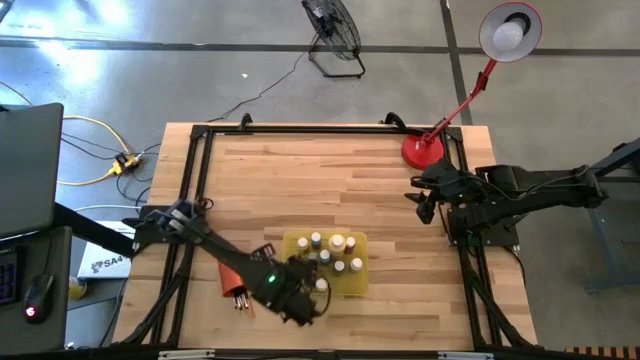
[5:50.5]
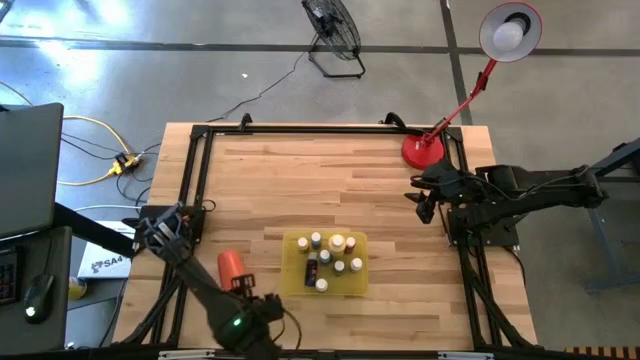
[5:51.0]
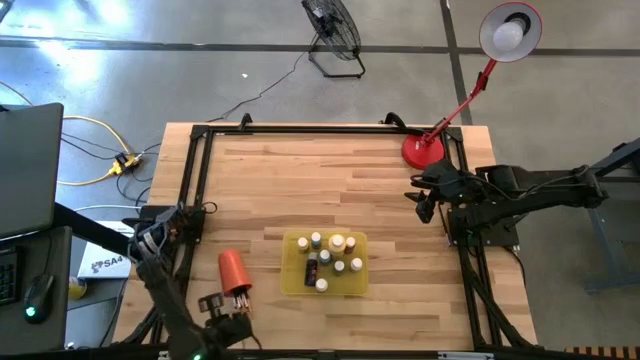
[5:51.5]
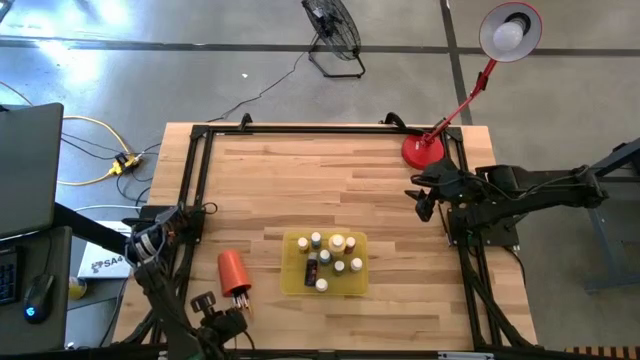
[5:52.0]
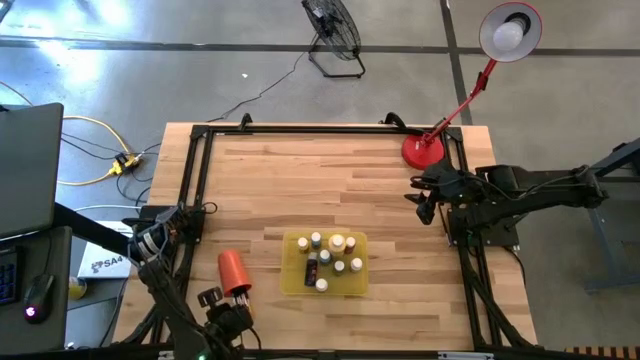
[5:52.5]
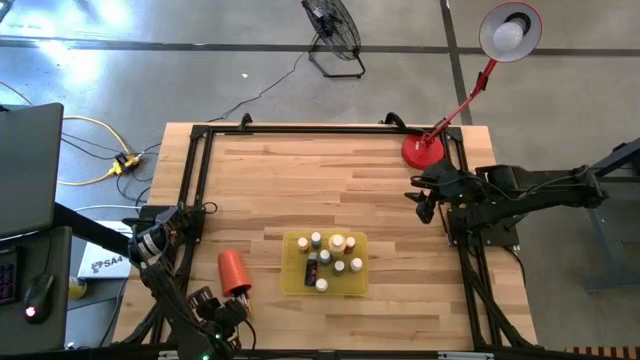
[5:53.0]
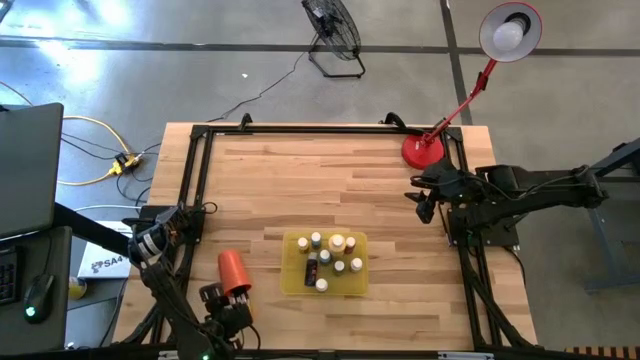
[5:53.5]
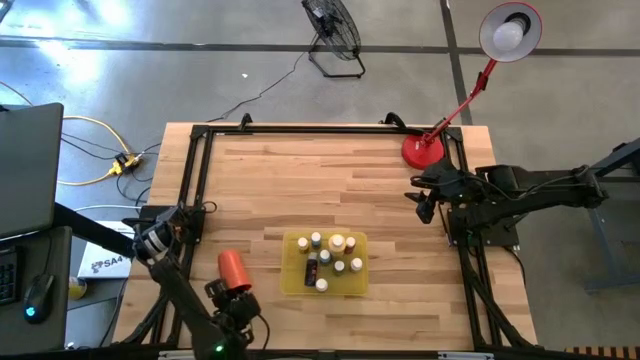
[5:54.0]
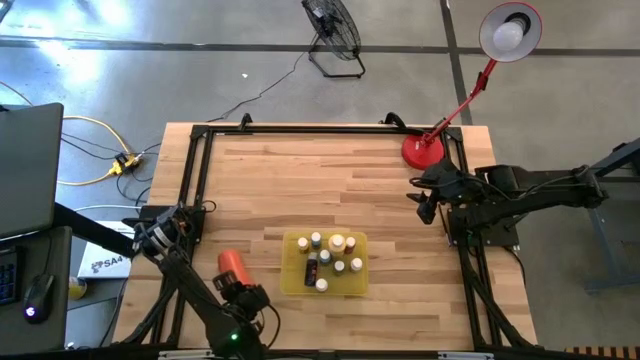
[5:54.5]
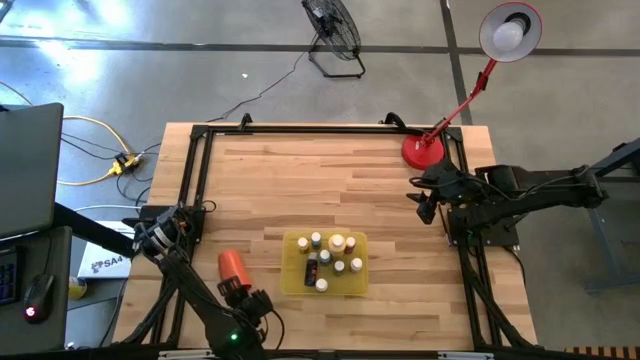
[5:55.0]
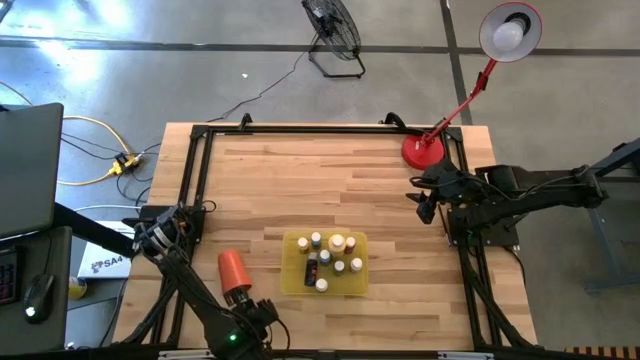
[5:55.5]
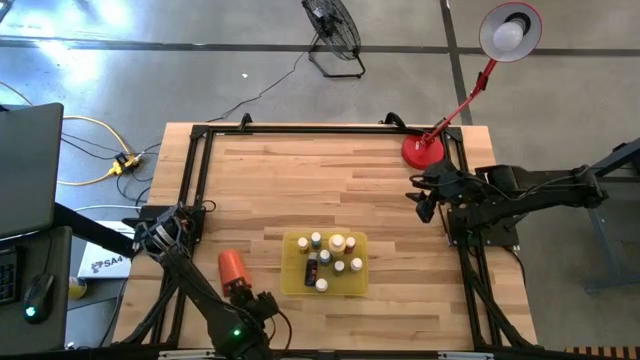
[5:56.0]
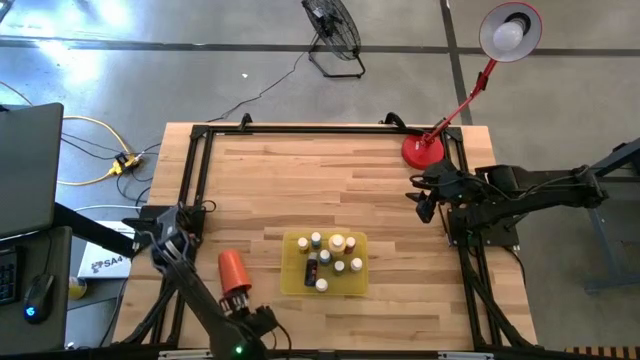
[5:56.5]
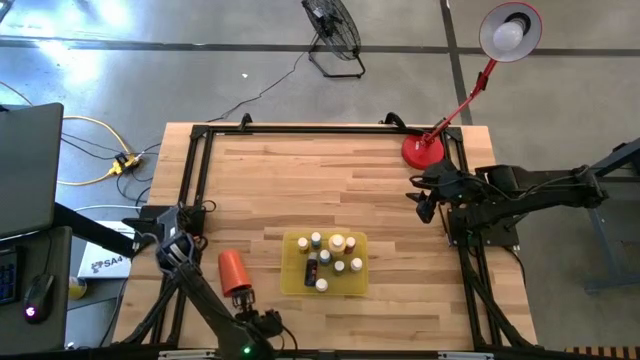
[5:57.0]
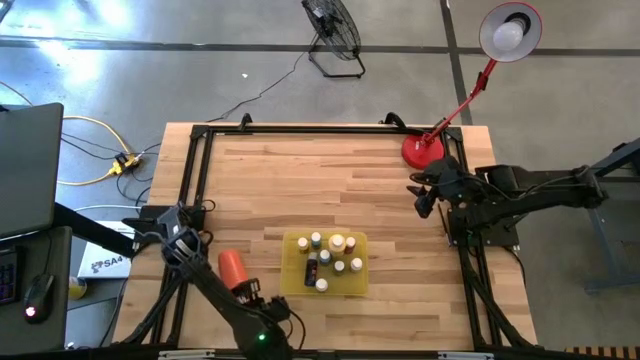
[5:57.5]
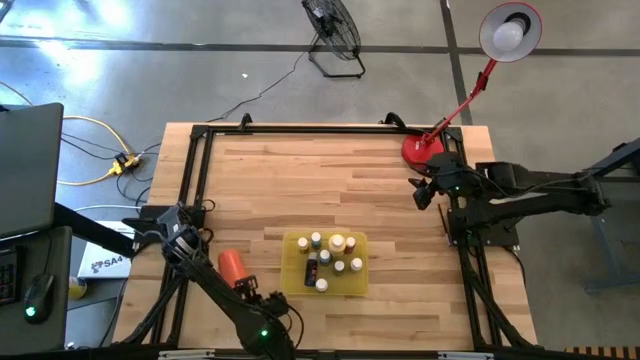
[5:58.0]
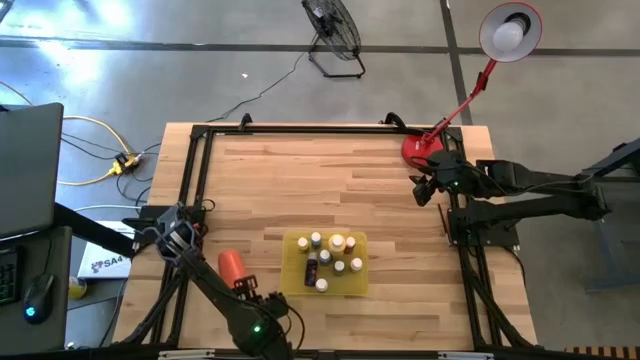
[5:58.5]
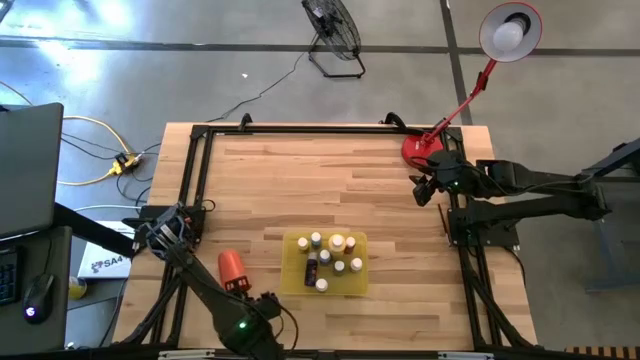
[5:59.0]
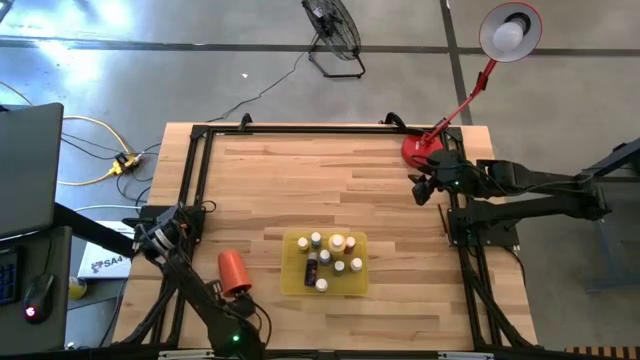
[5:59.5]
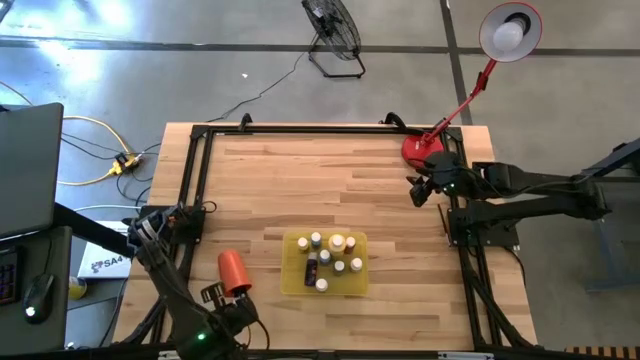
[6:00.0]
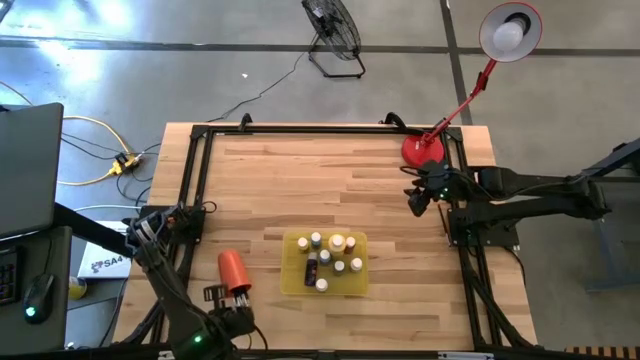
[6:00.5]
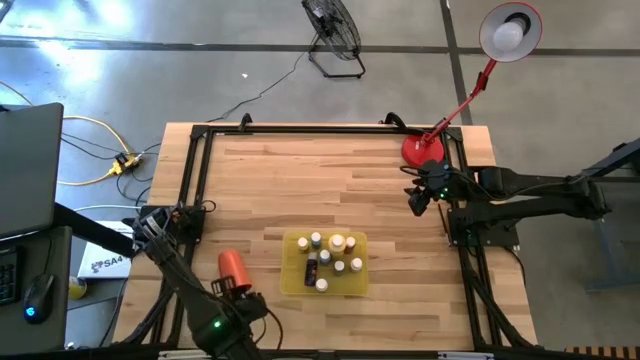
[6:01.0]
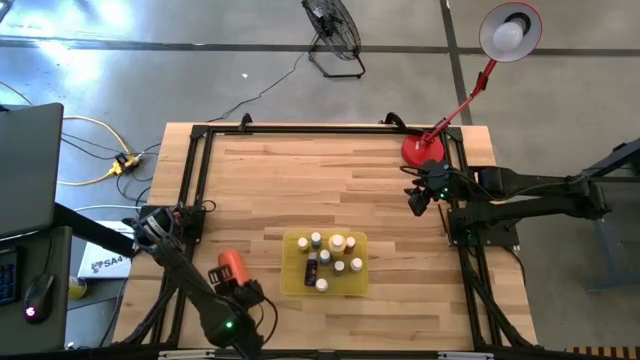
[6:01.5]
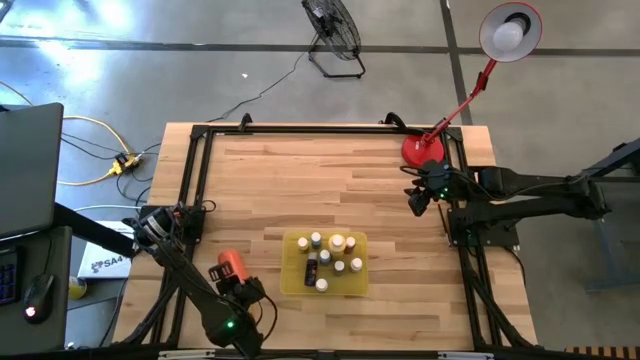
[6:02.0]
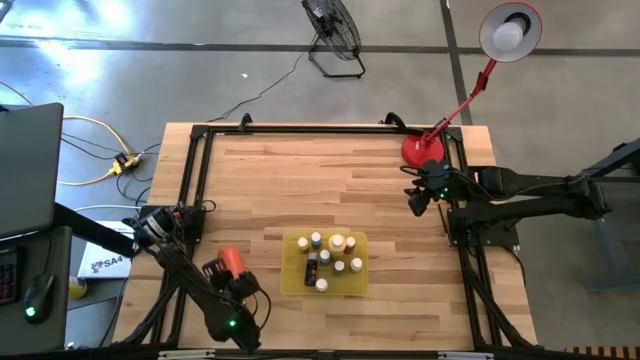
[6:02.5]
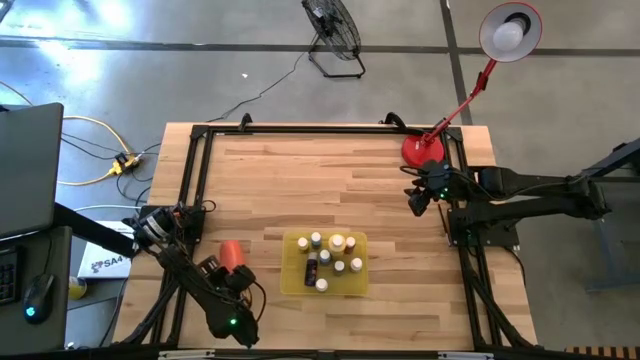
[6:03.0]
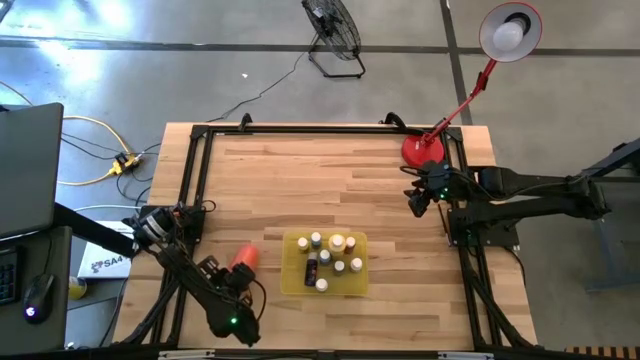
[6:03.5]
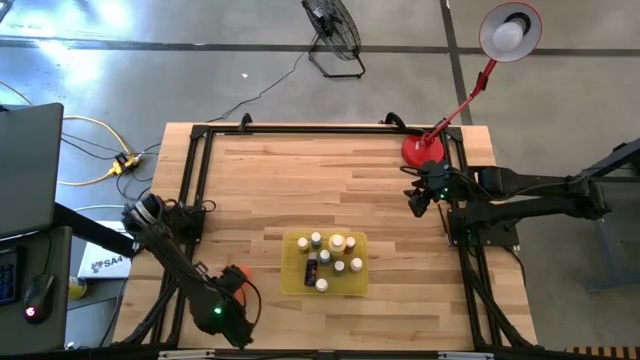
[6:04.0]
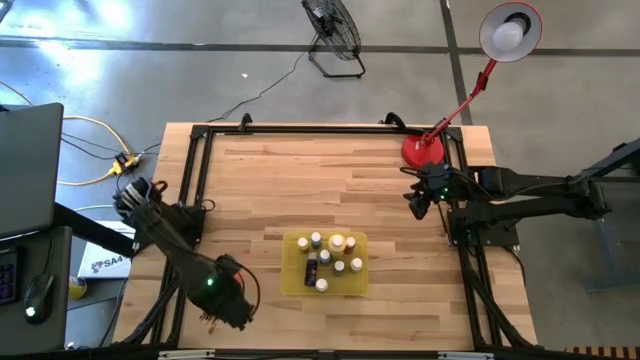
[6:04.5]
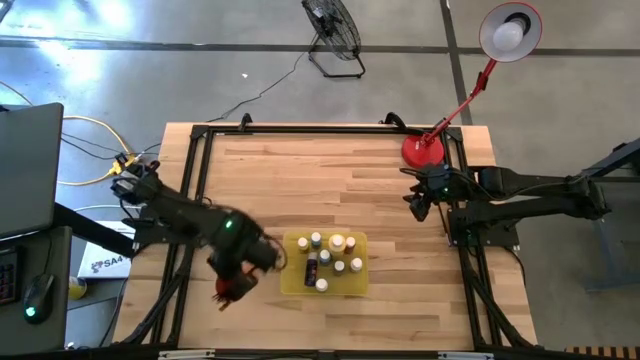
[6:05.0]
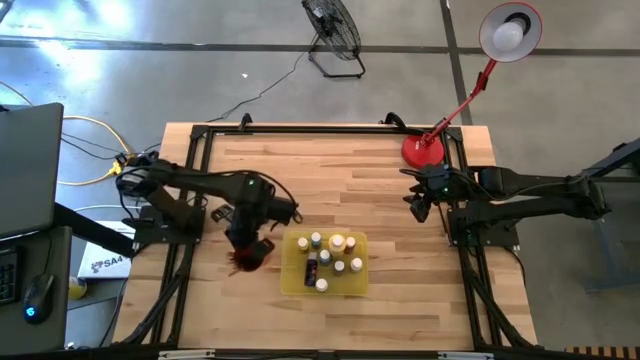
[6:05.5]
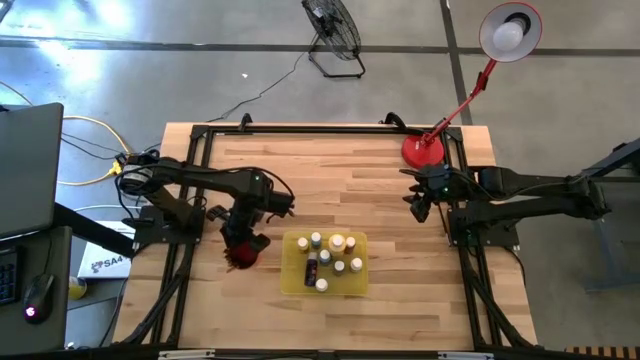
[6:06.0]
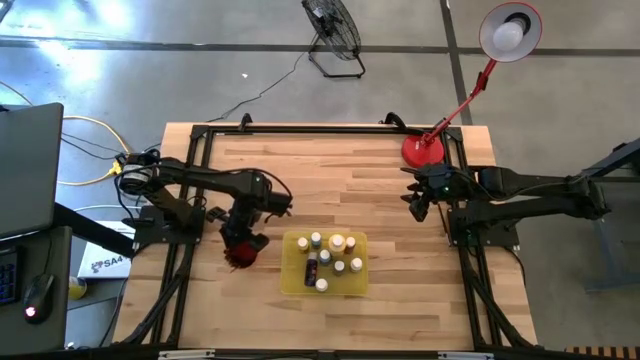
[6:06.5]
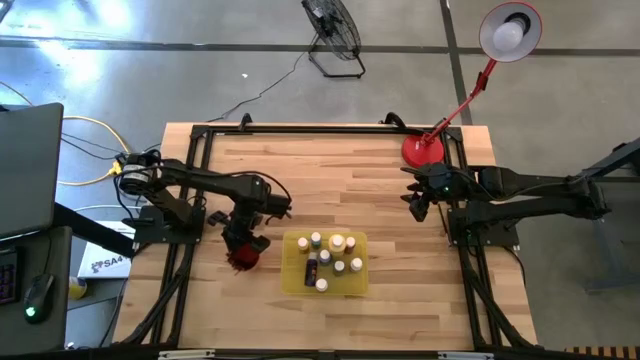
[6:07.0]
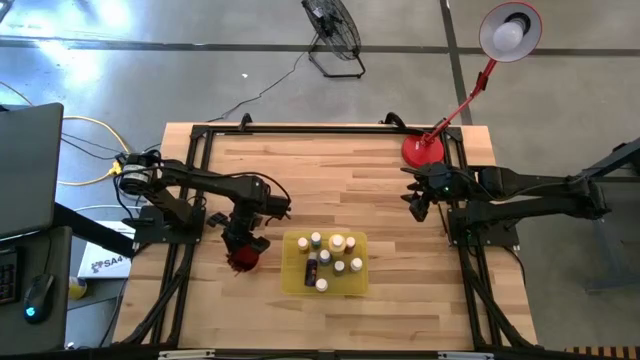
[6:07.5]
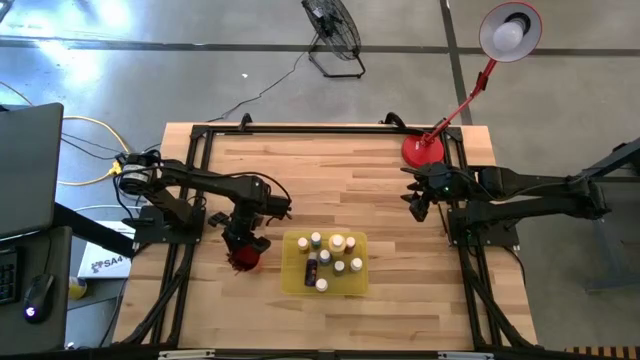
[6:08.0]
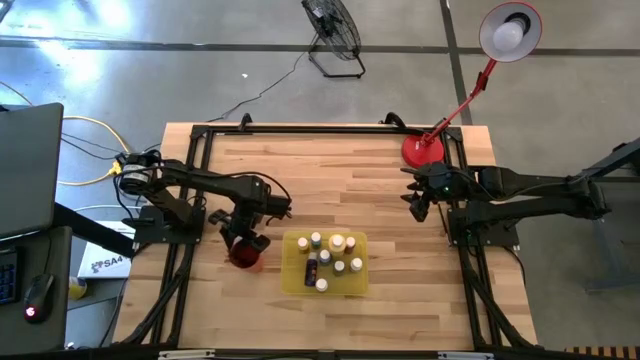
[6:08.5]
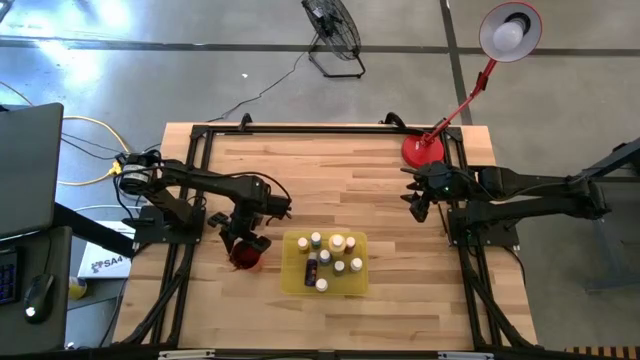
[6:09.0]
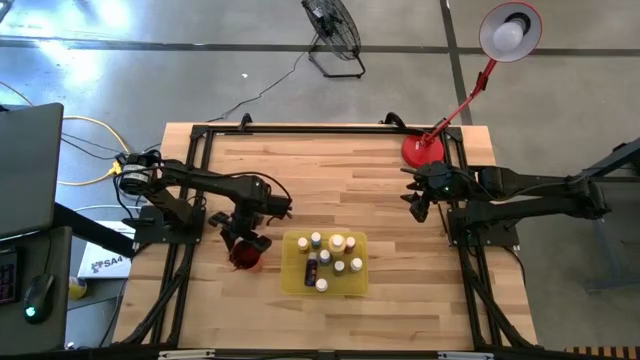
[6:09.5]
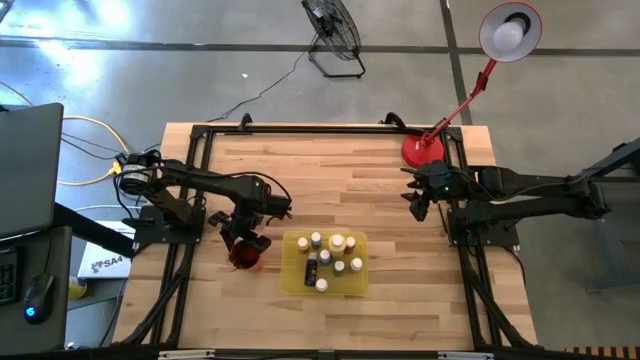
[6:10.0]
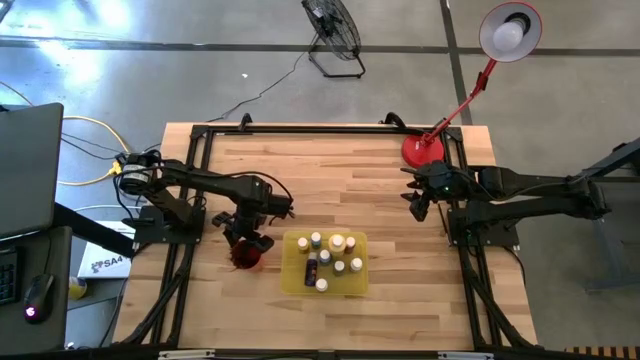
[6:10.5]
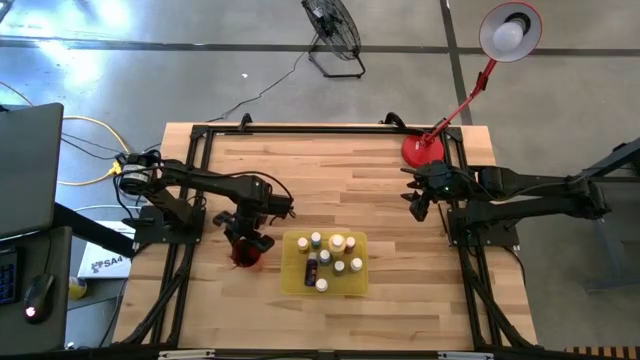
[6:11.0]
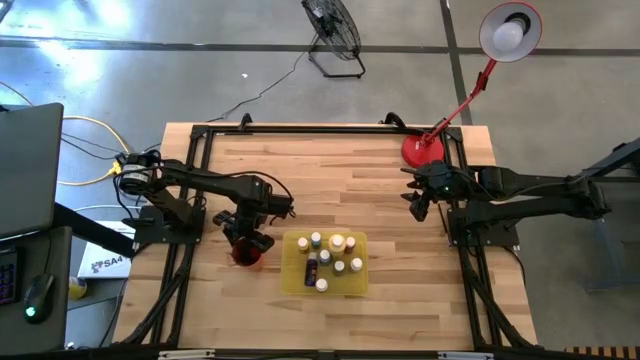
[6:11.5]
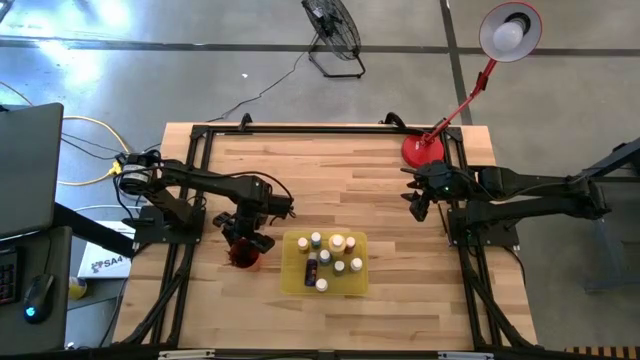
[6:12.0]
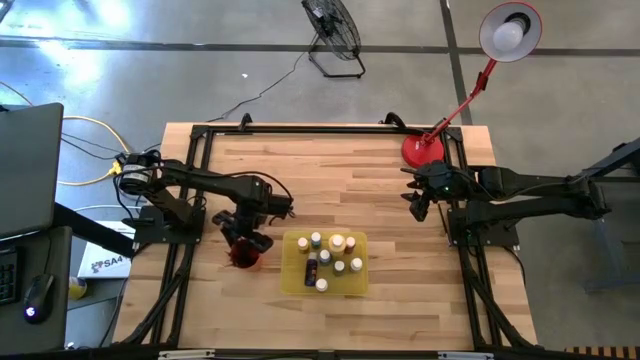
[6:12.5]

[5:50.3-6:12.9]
Task: Pick & Place Paint Supplies
Adjust the orange cup
